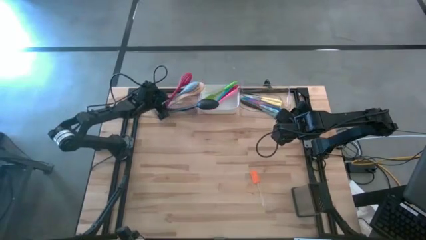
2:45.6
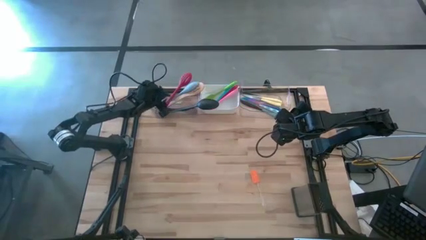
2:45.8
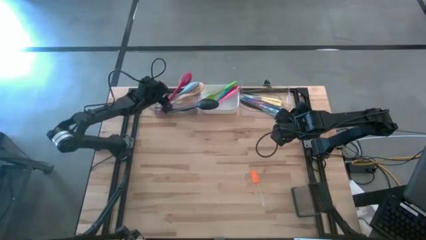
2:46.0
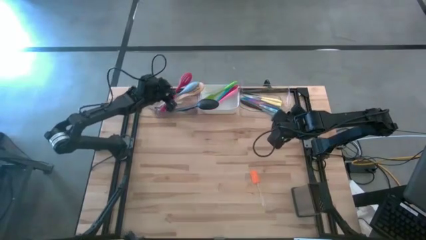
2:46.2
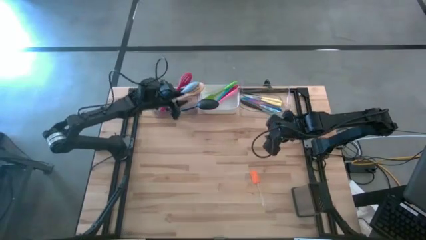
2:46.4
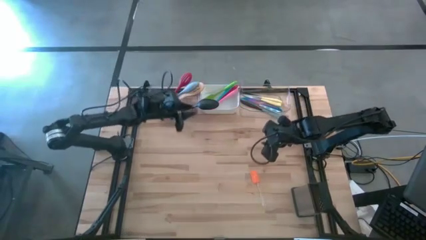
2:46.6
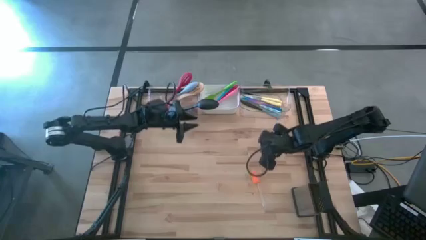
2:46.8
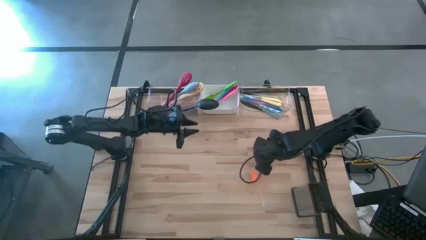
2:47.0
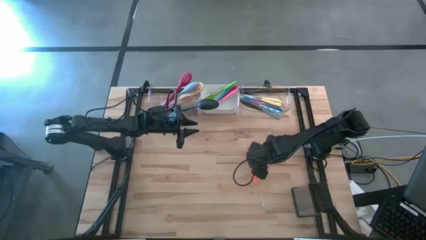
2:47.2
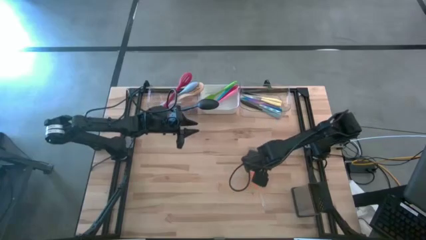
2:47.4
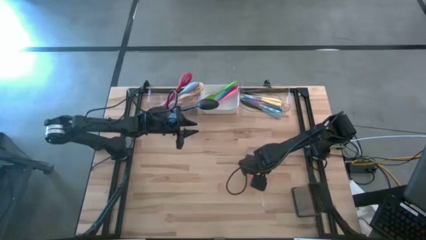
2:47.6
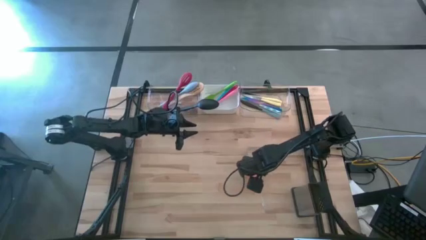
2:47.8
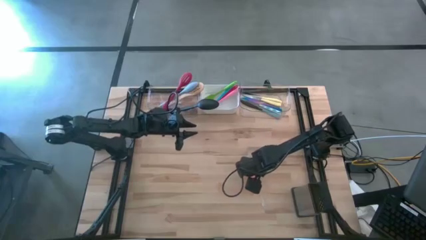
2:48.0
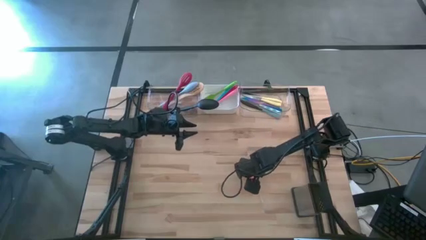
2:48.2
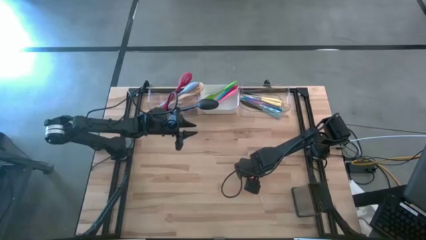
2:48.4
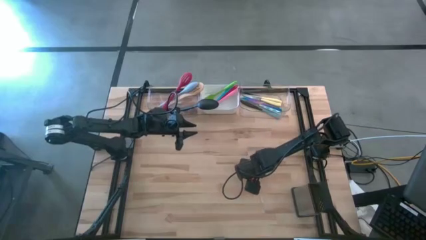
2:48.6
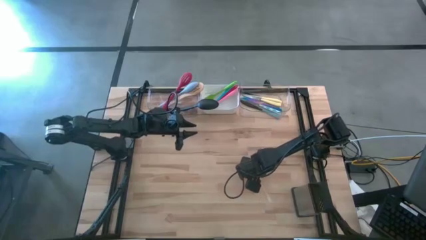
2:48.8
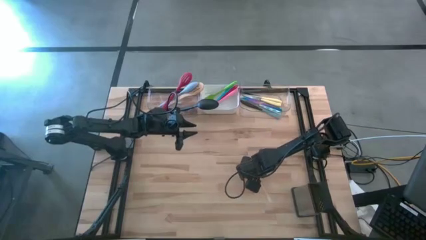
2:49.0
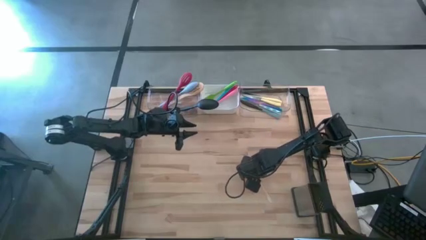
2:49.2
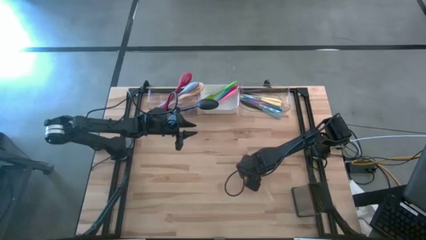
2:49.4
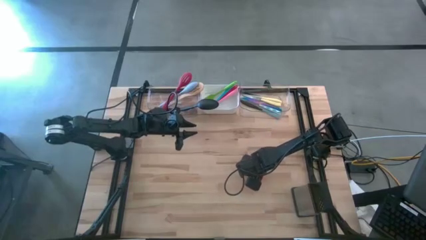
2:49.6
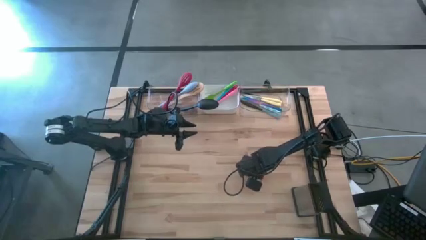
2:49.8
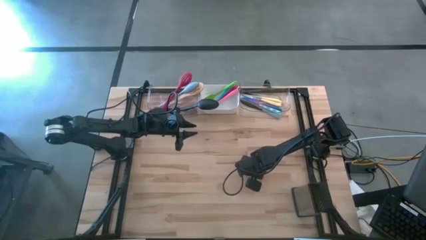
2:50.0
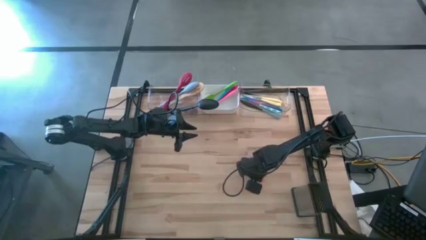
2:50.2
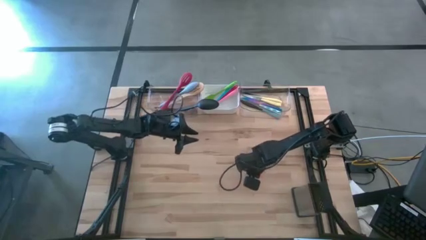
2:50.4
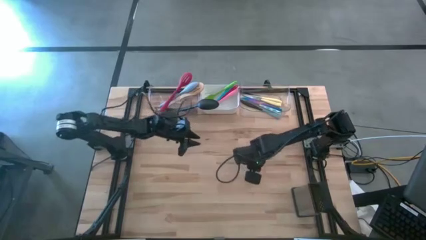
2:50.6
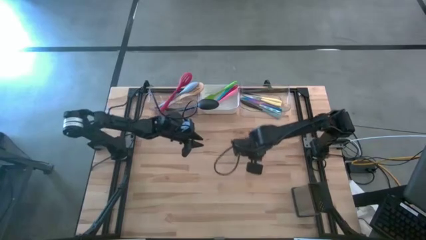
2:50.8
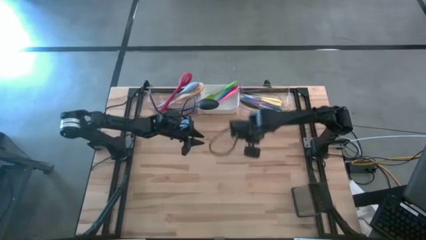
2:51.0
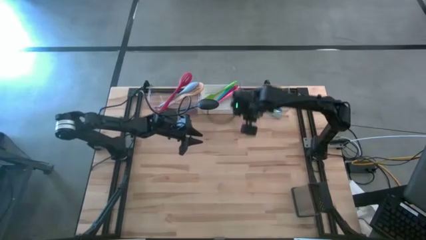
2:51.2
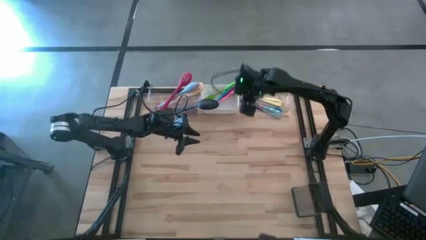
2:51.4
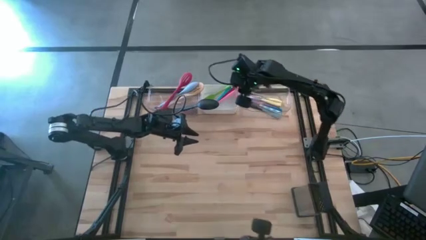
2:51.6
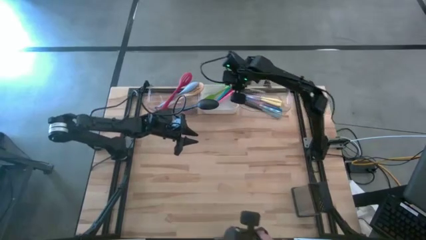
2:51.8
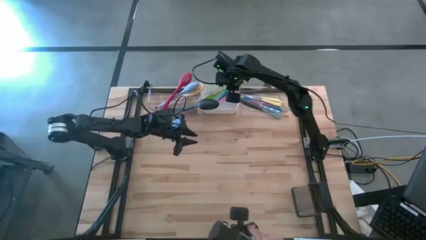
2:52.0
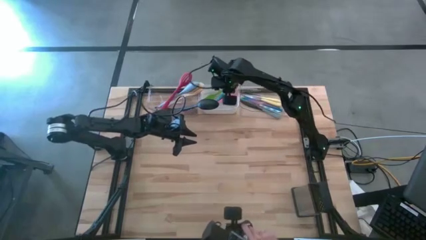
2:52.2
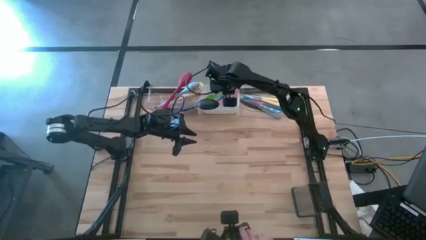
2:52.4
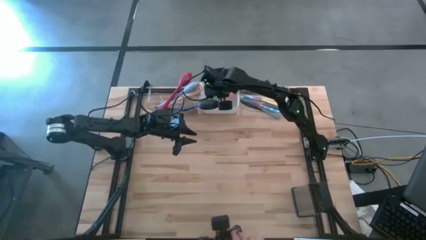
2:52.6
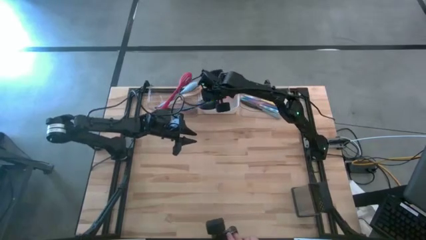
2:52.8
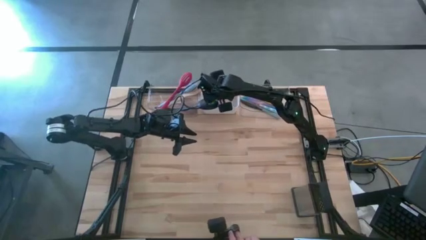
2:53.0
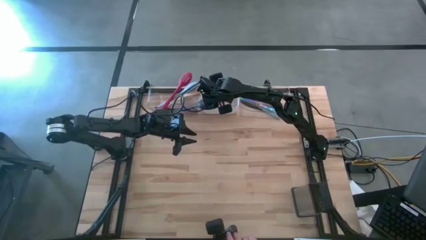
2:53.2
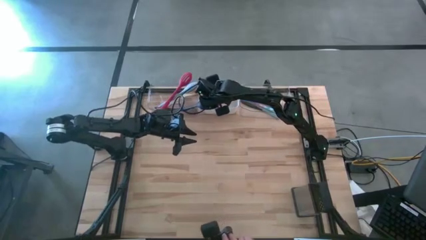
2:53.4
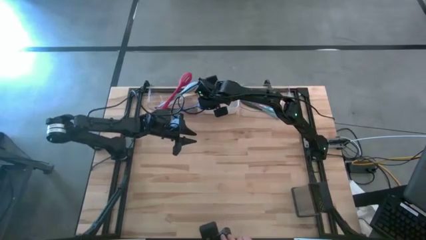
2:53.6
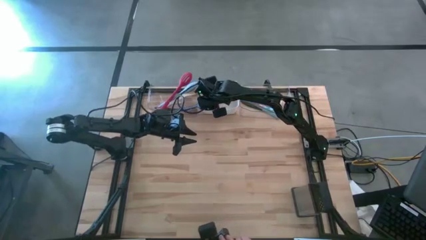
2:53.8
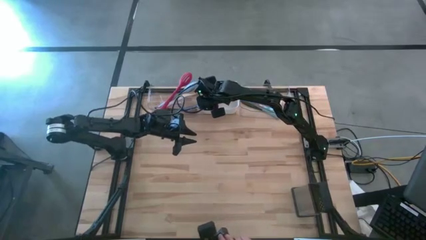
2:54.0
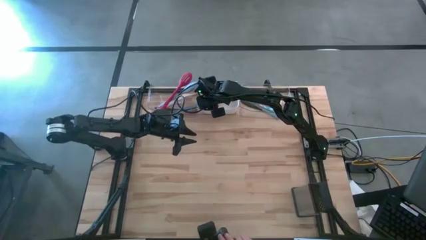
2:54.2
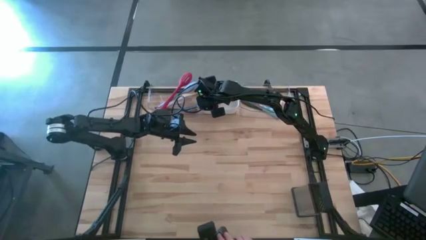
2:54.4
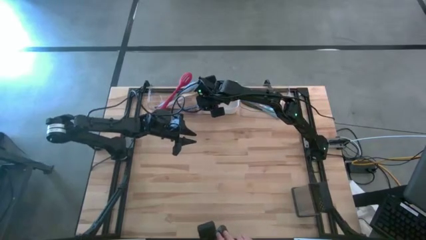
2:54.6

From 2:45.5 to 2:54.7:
Task: Pick & Place Kitchen Items
Put the orange spatula into the white bin

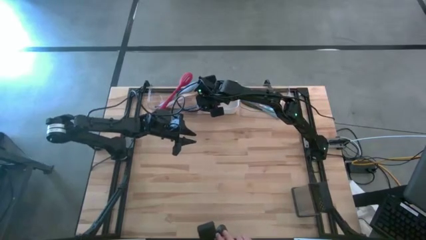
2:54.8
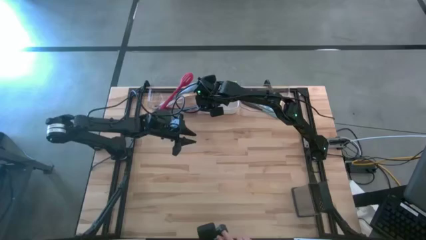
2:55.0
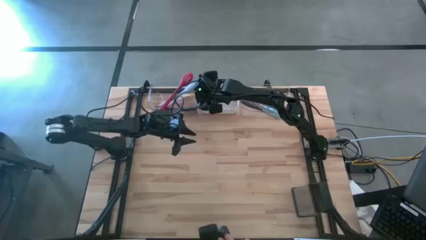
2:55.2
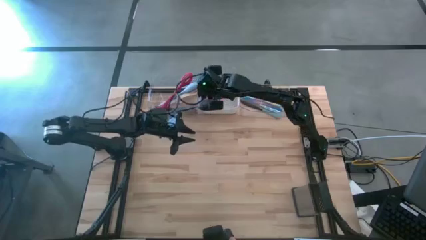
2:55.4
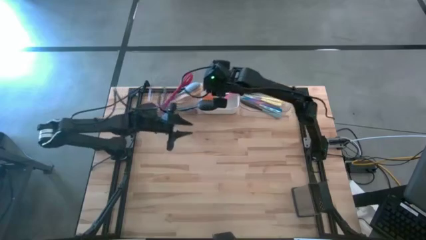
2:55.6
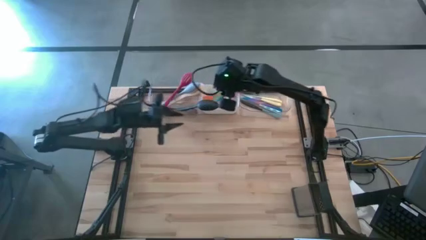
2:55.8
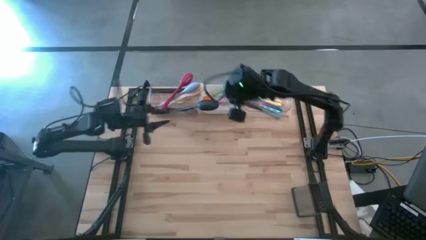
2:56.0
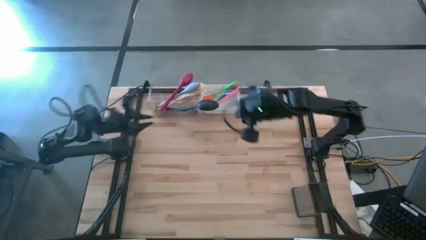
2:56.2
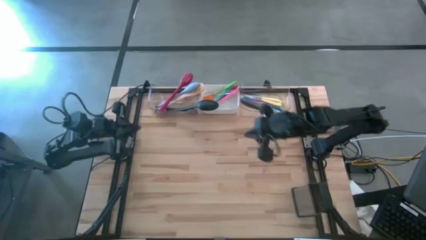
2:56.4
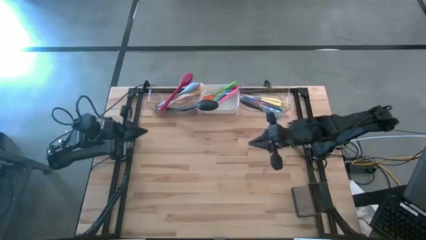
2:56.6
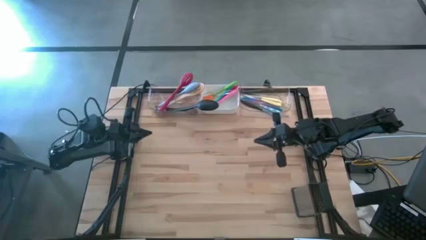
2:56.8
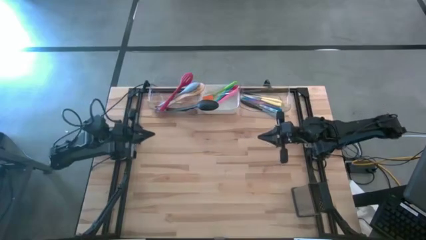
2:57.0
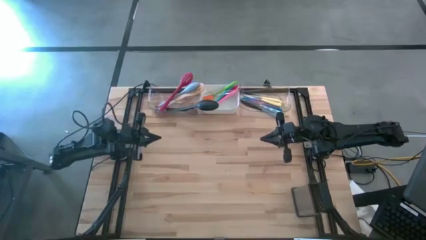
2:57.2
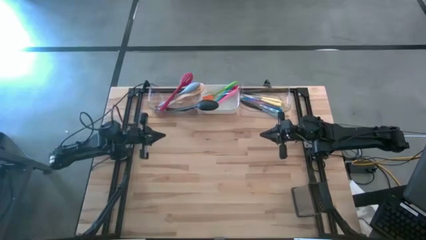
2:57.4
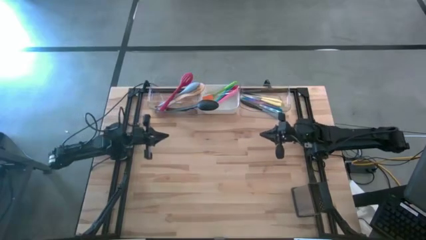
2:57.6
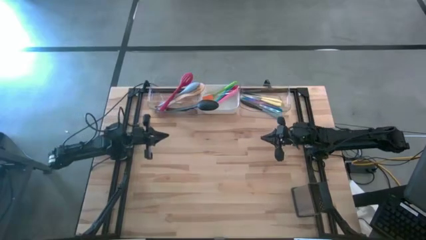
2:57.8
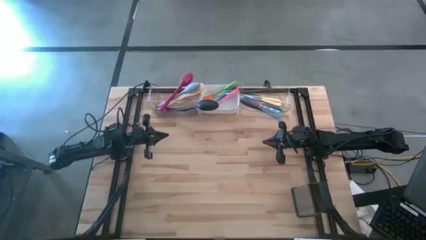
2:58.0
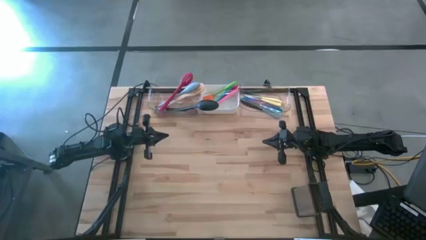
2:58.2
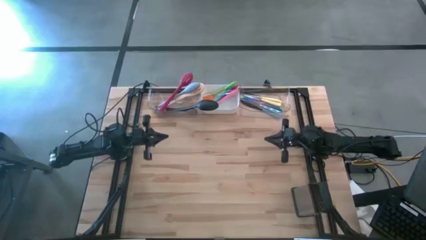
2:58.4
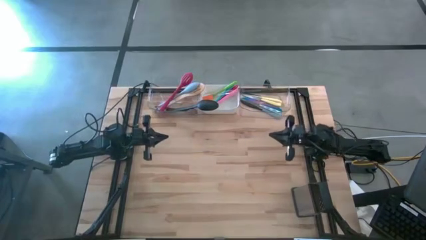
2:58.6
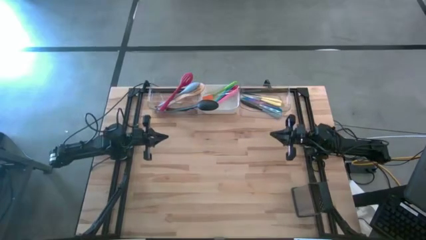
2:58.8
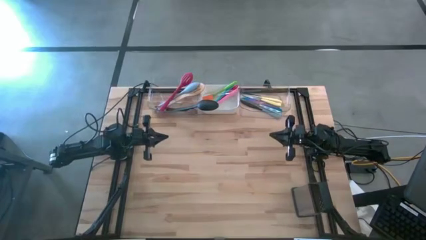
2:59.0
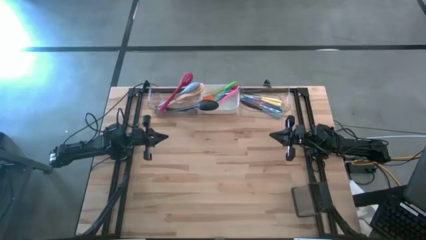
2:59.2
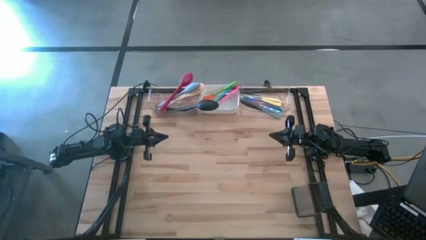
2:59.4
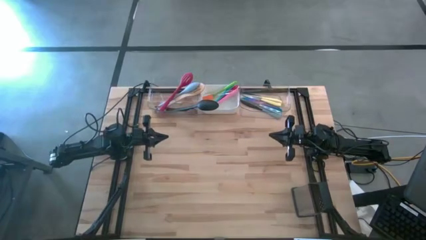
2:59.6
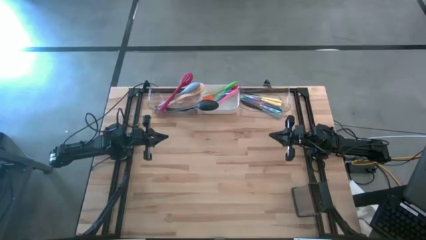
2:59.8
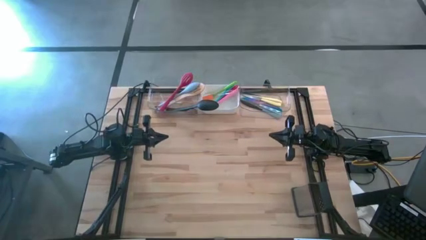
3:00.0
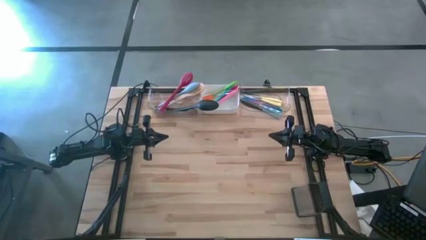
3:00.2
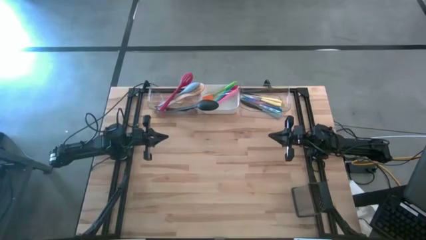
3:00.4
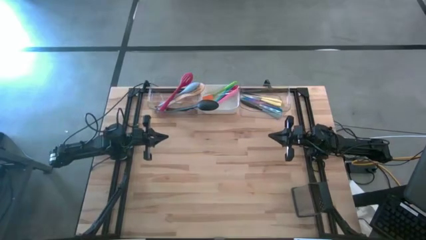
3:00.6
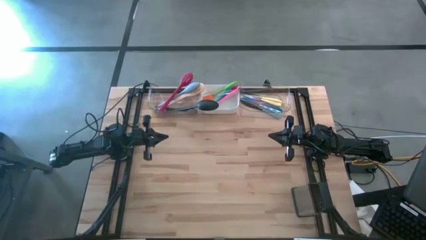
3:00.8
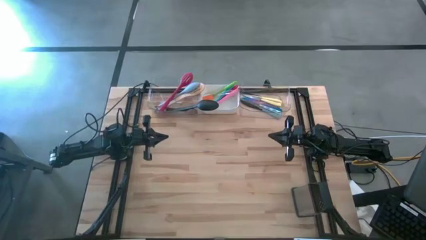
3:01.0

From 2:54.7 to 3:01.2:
Return to Home Position
